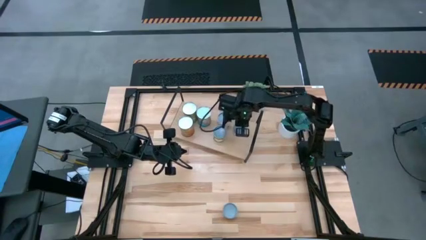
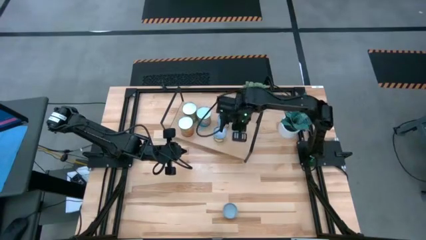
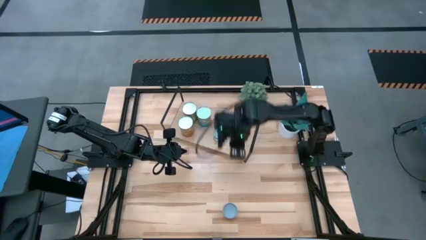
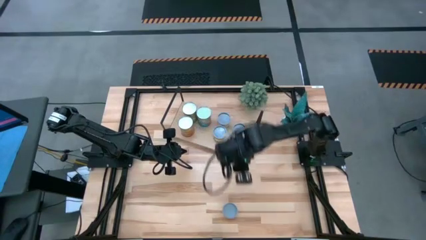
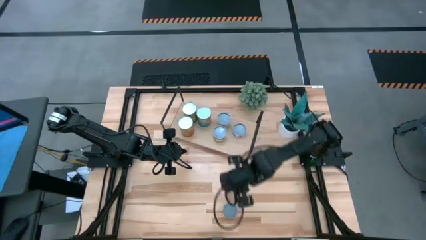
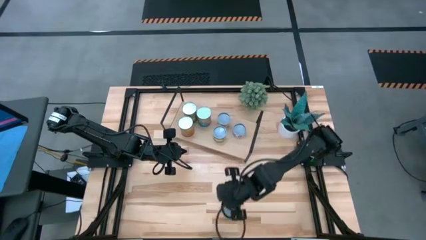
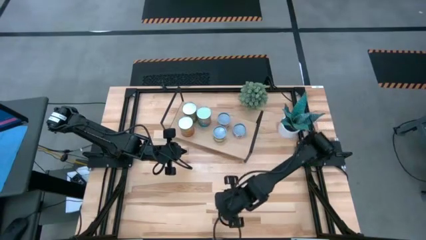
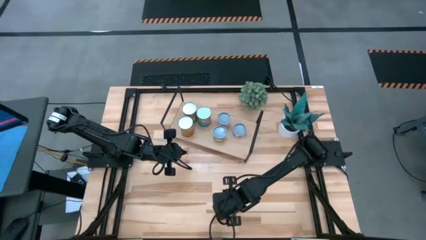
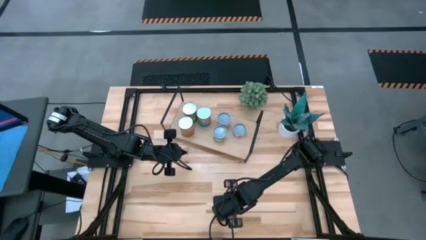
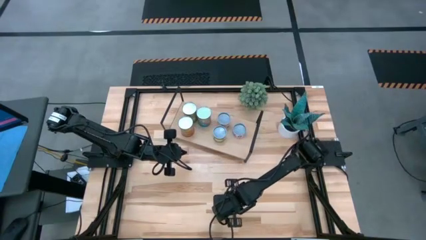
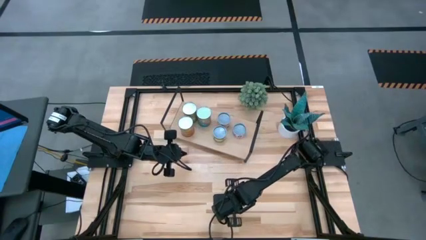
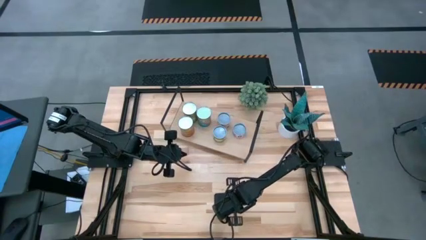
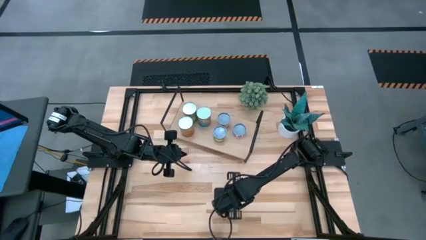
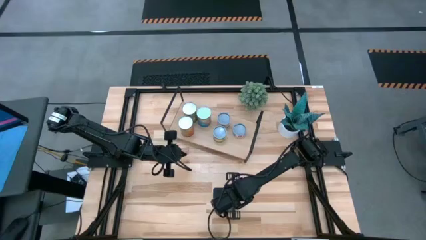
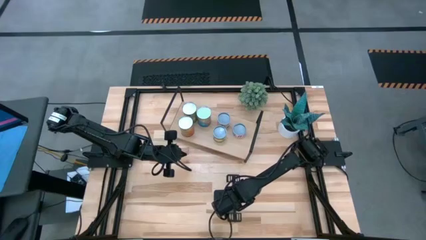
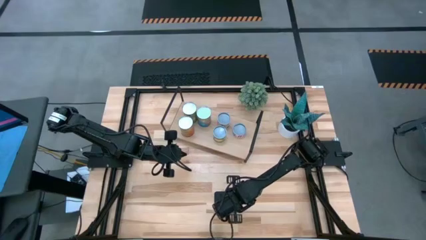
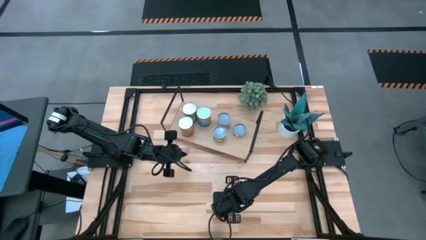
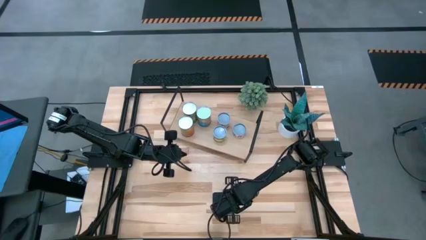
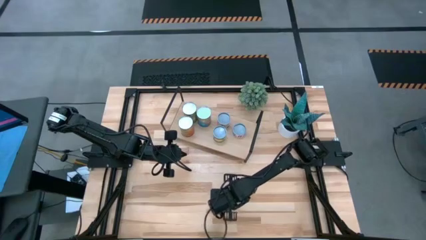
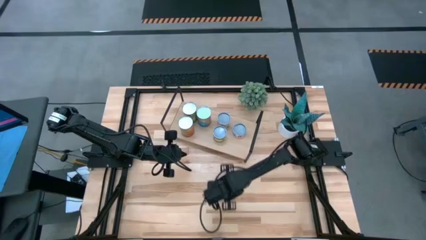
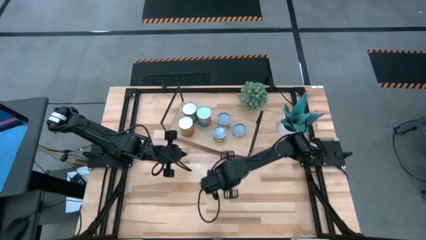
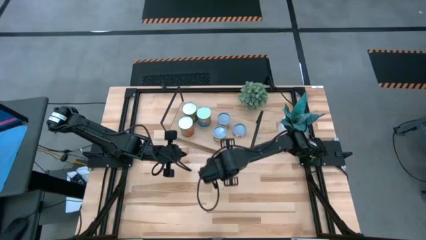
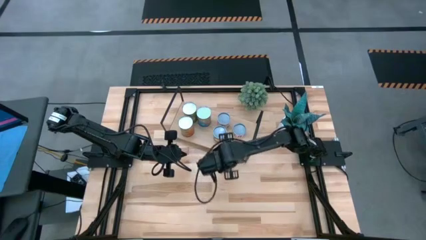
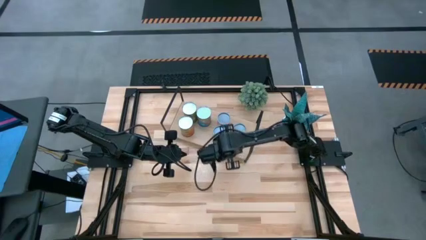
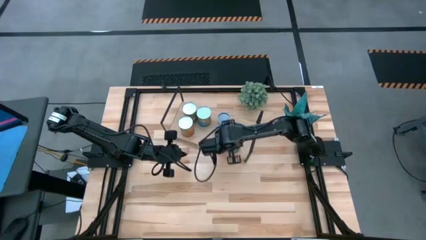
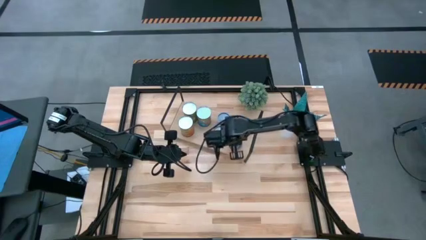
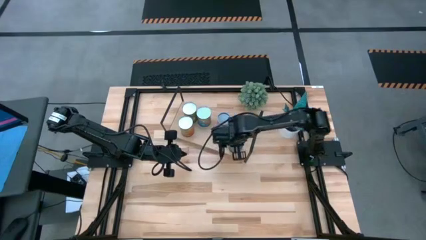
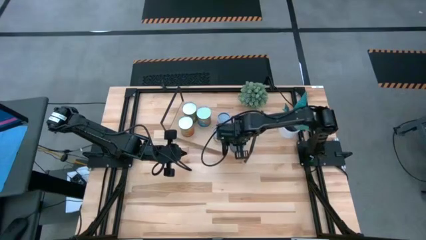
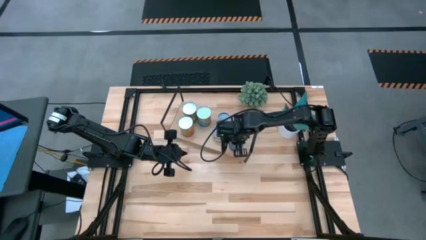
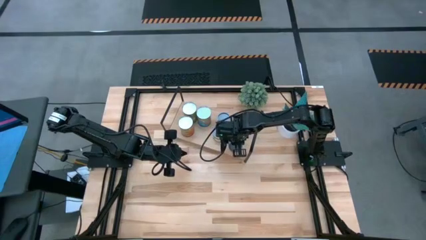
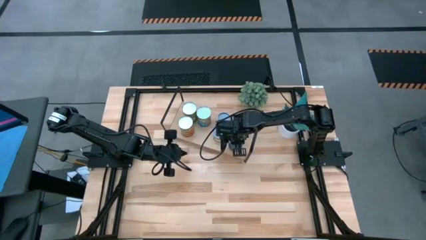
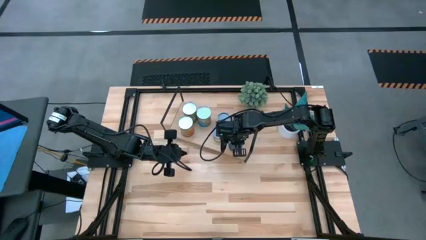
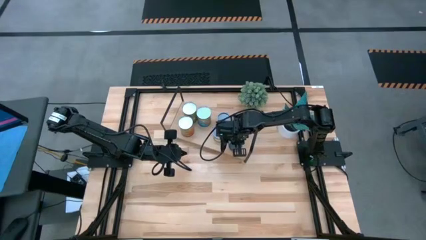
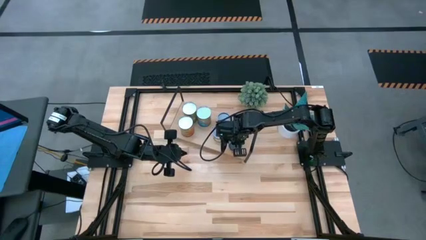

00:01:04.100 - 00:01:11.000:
Task: Pick and place cans onto a shelf
Put the canned pineapple rings on the shelf

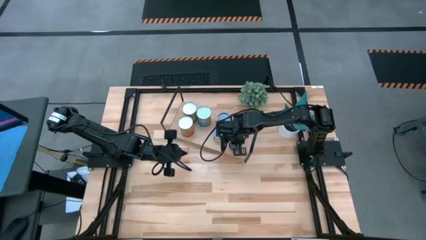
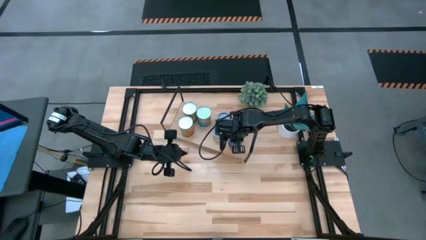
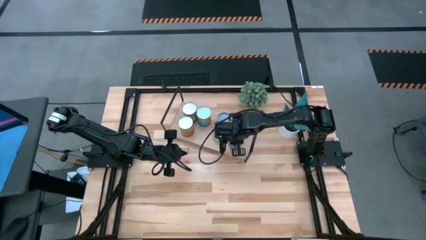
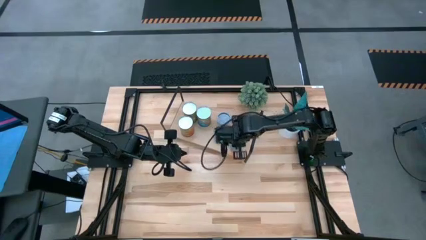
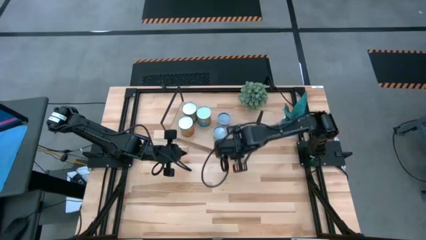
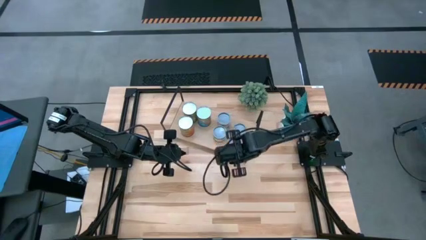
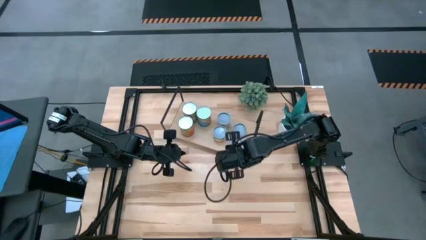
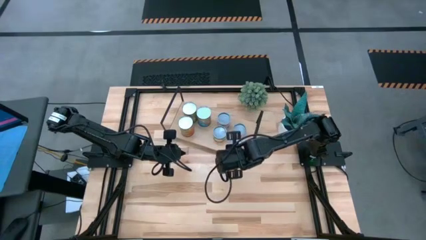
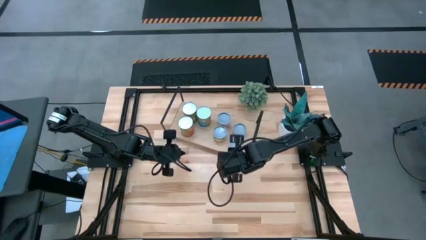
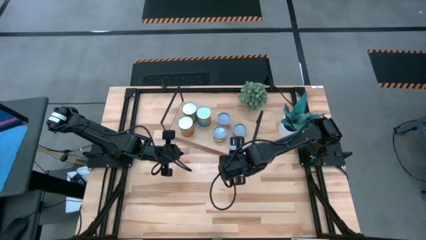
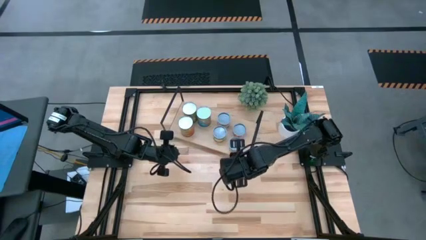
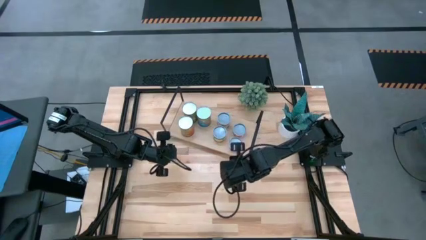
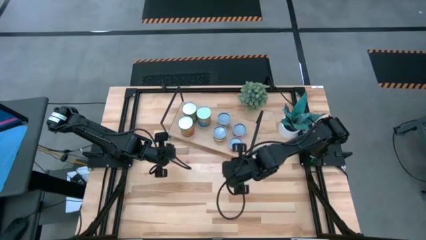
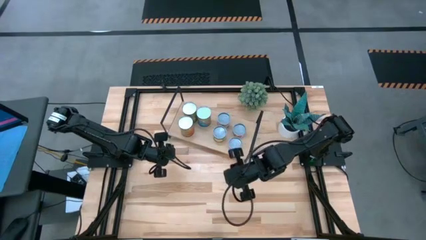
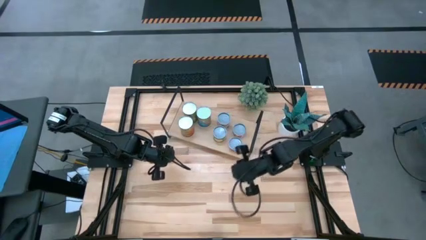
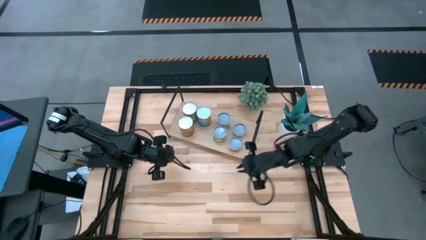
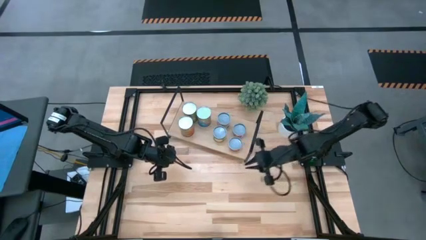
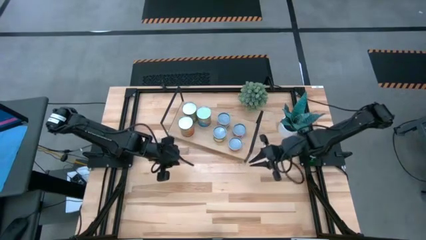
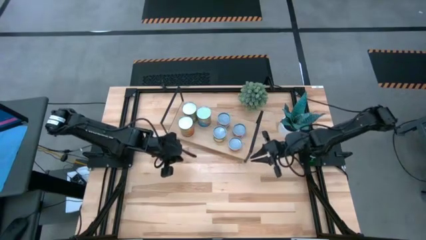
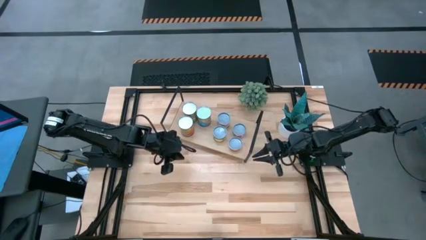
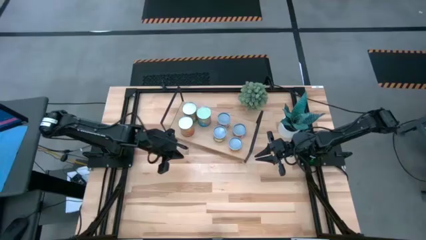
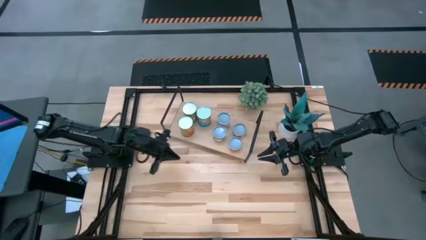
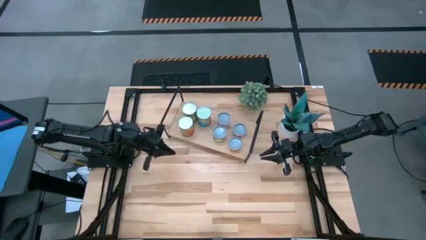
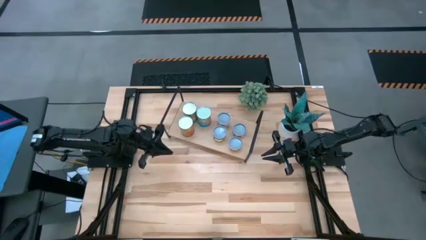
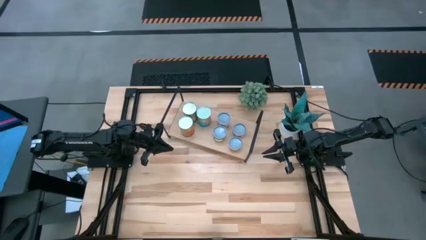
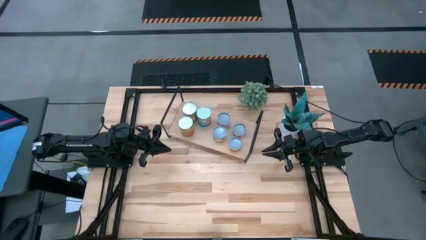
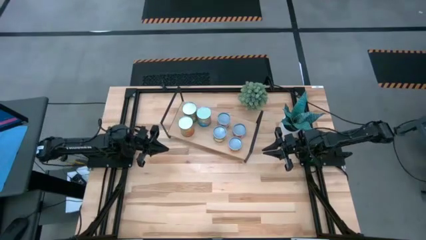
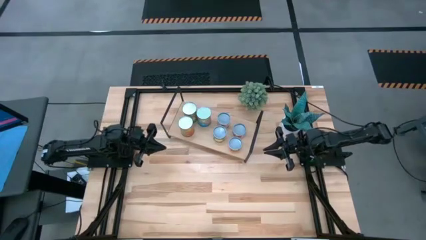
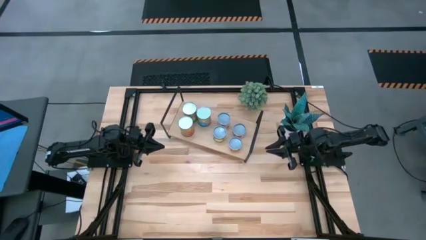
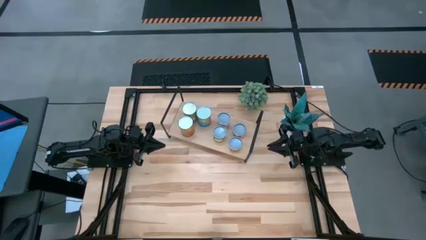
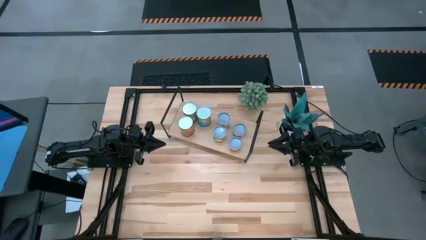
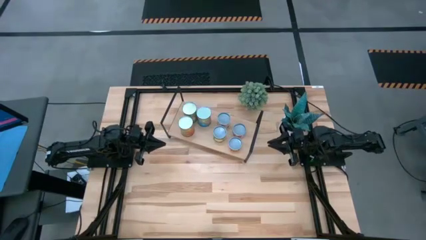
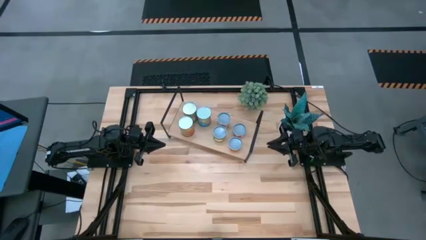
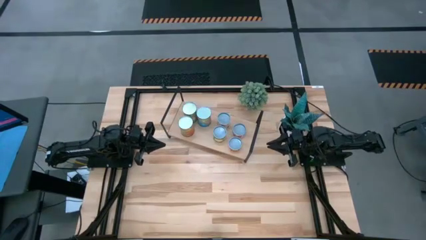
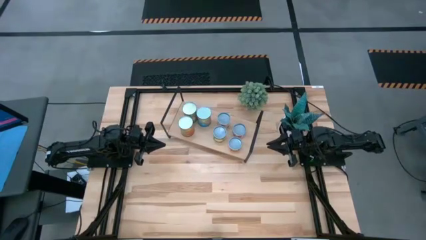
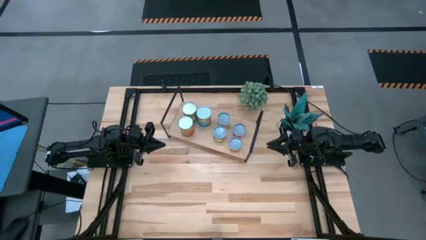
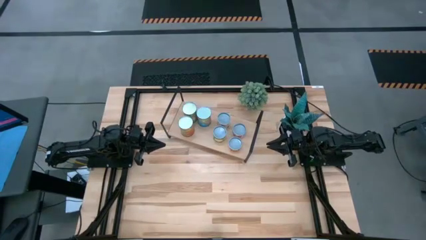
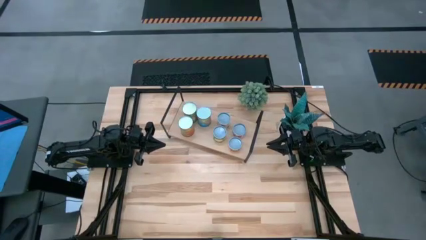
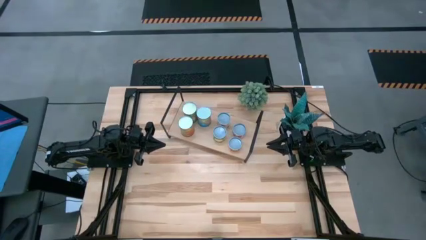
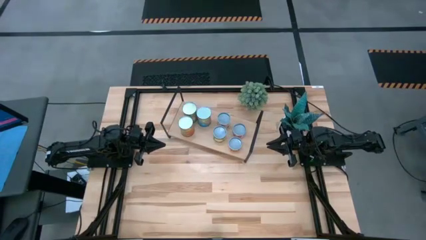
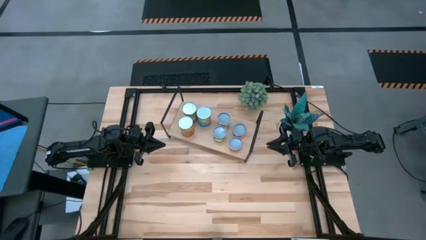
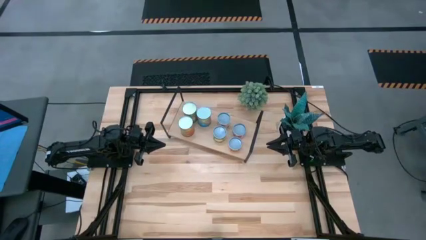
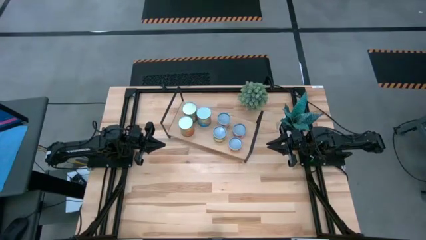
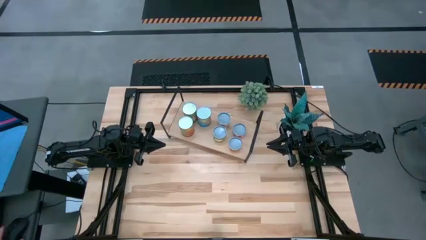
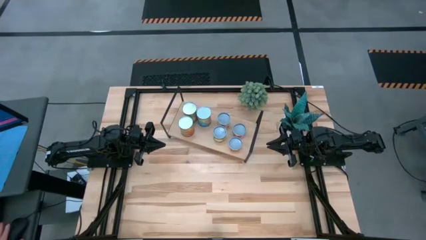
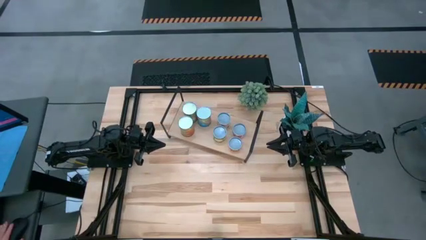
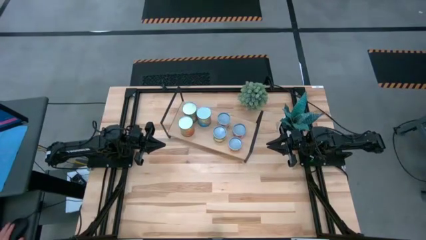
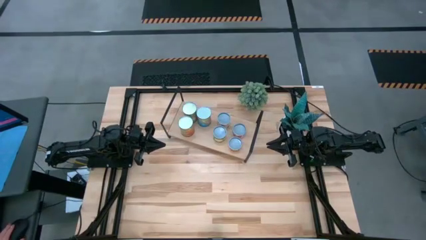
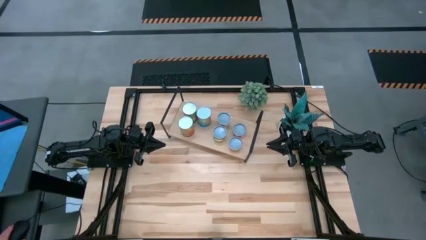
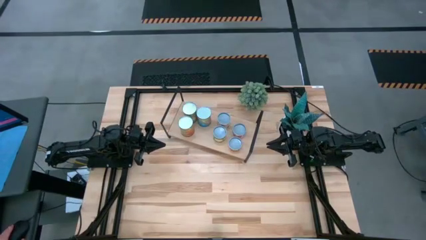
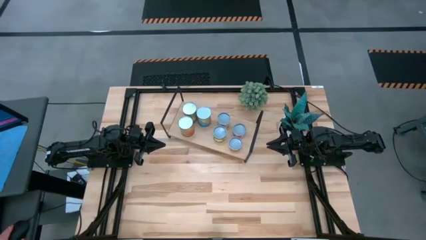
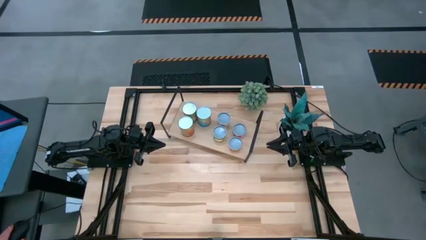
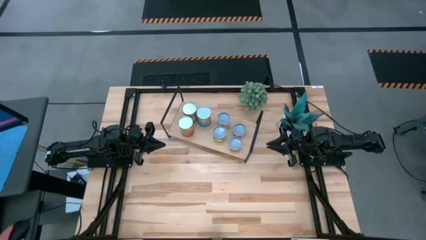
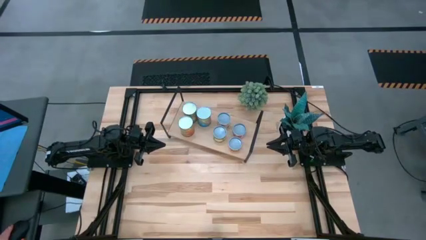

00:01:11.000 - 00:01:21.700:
Return to Home Position
